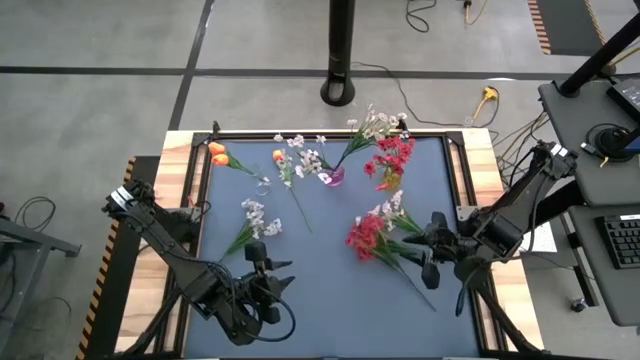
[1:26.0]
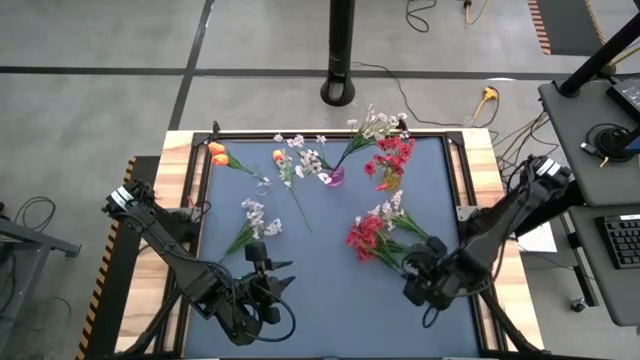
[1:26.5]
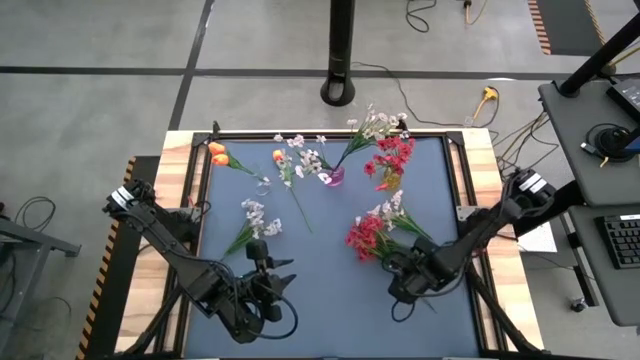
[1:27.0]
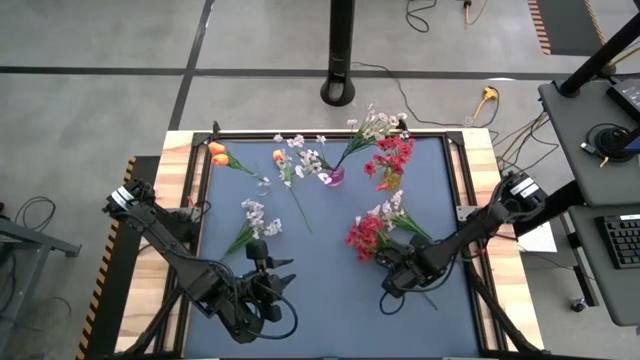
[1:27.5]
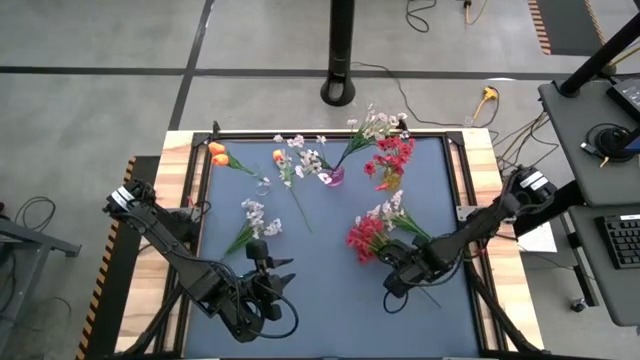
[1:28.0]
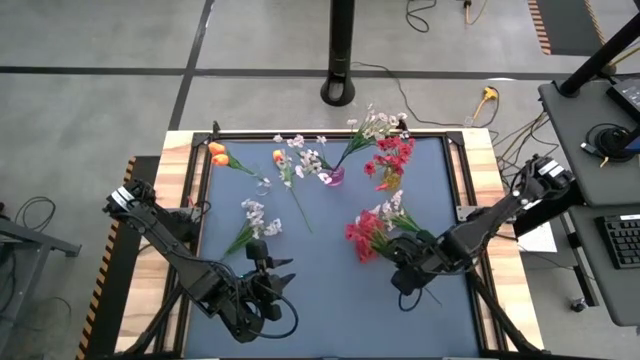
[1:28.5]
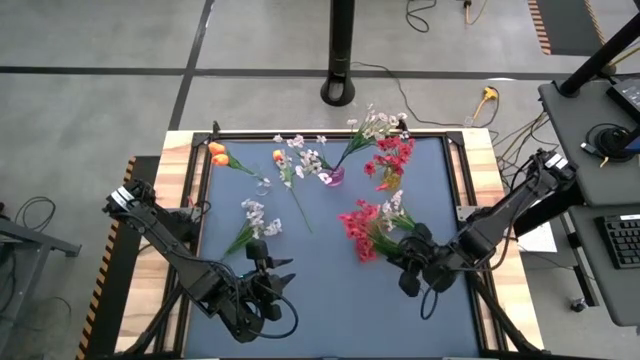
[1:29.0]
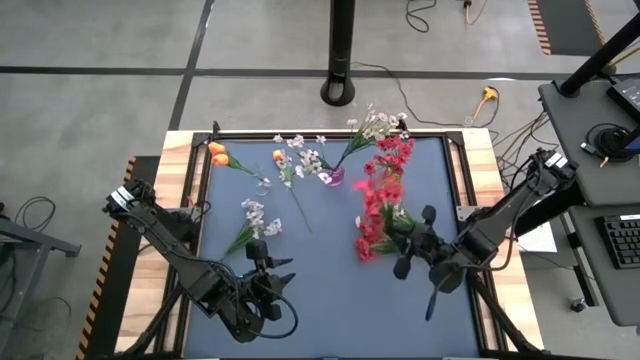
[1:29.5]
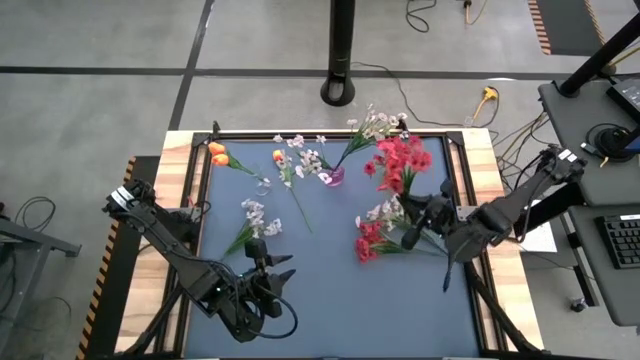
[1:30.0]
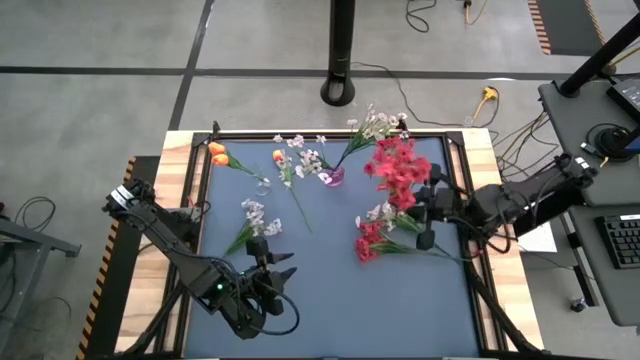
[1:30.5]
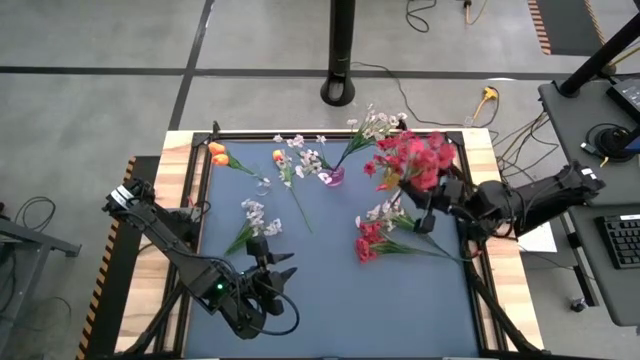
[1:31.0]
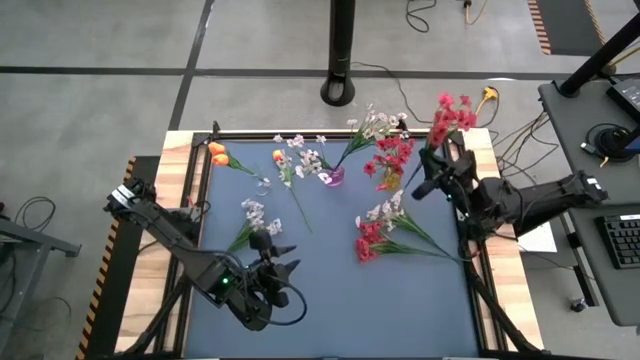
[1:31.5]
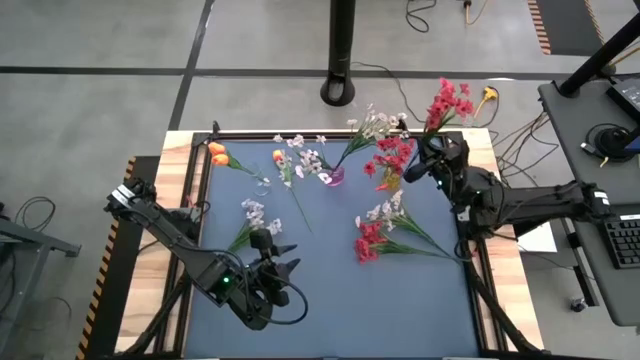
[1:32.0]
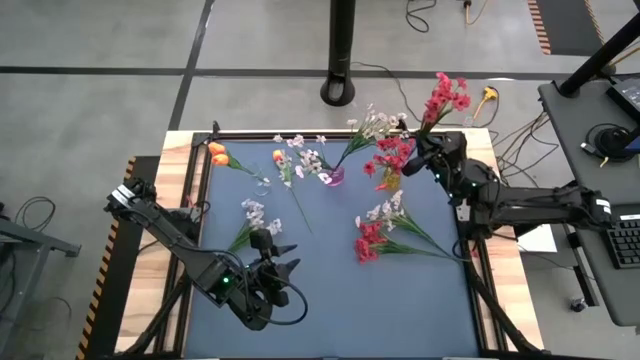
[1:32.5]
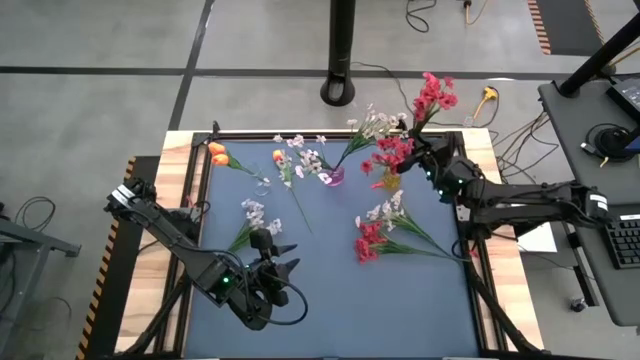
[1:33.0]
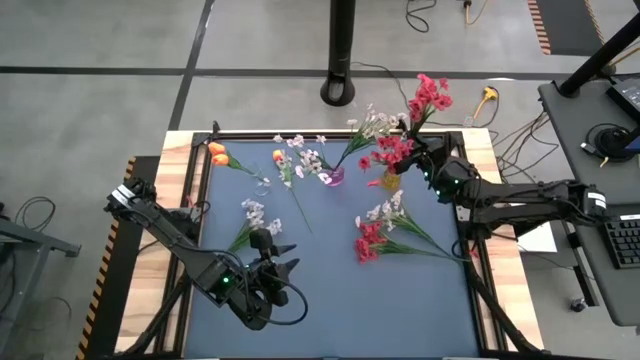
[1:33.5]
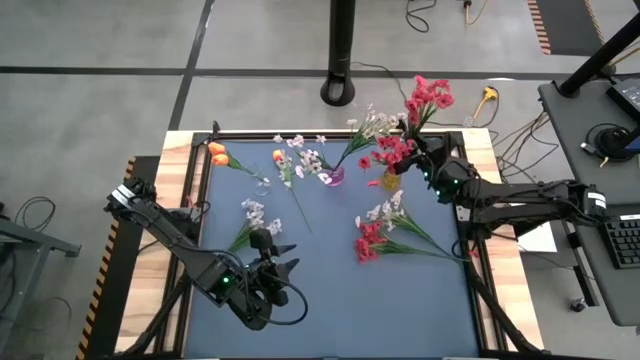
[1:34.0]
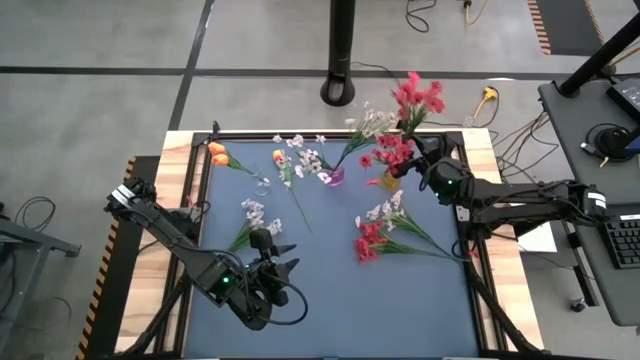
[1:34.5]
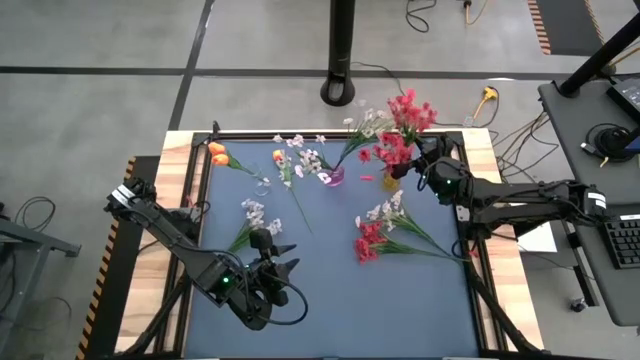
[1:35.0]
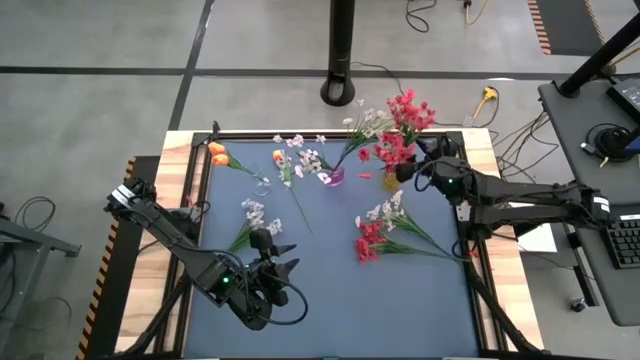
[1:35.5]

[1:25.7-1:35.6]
Task: Sort flowers into vase by color
Put the red flowers into the yellow vase

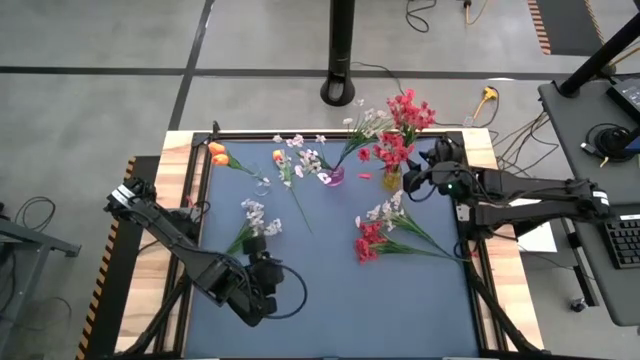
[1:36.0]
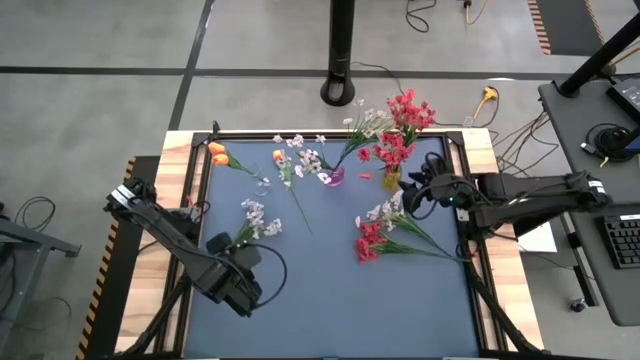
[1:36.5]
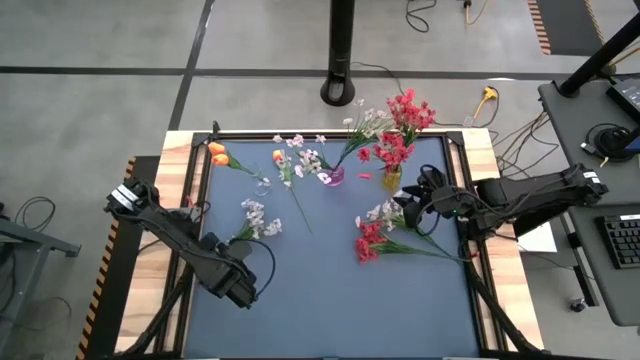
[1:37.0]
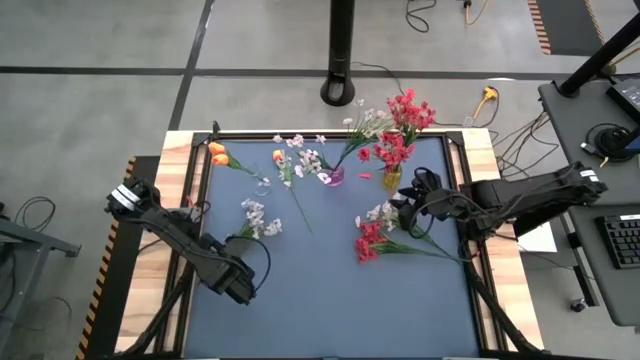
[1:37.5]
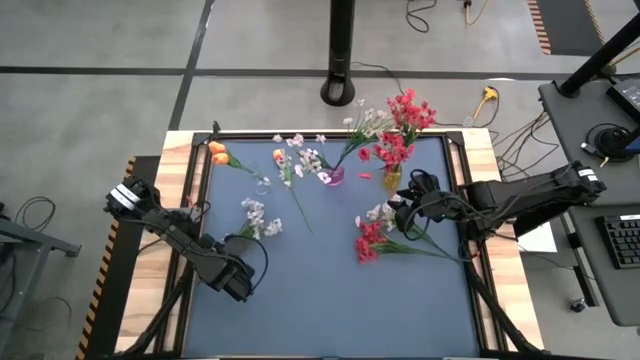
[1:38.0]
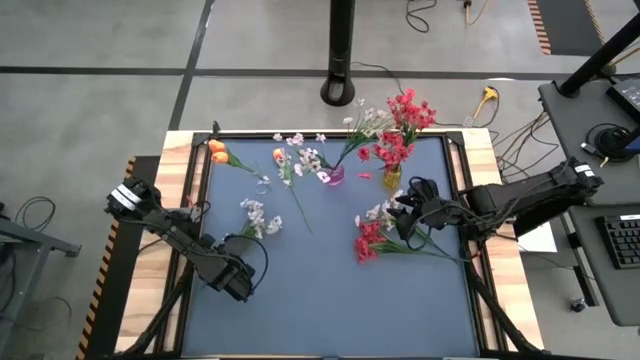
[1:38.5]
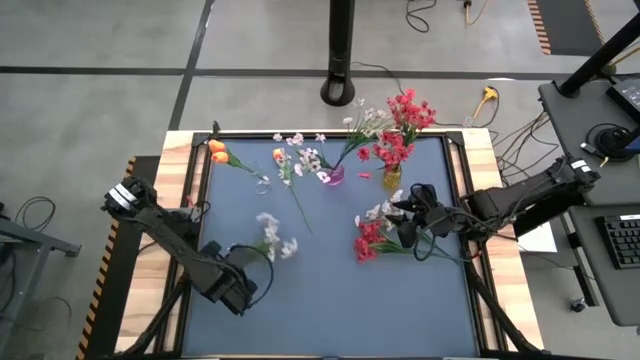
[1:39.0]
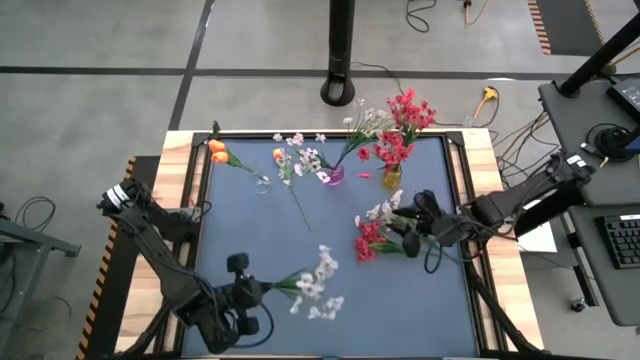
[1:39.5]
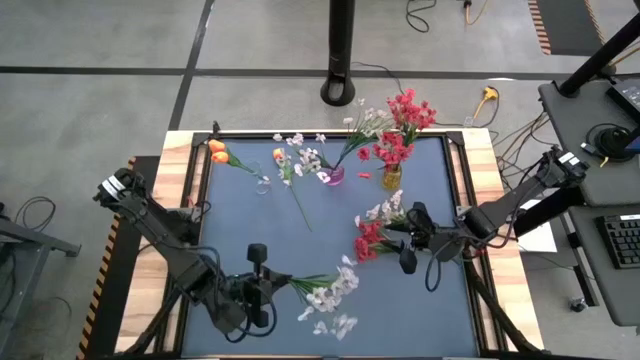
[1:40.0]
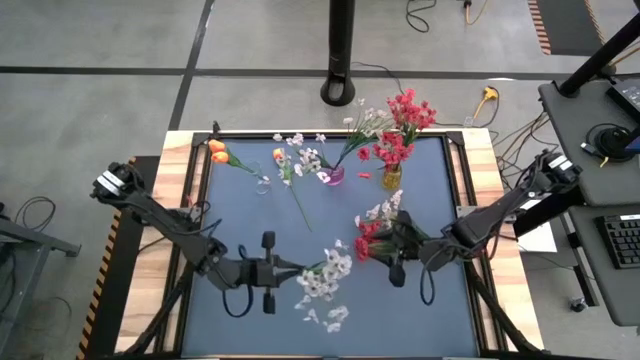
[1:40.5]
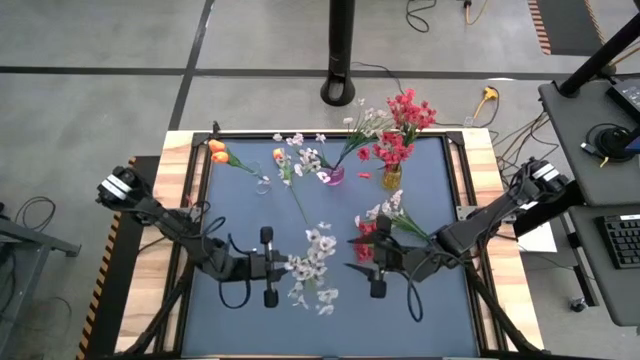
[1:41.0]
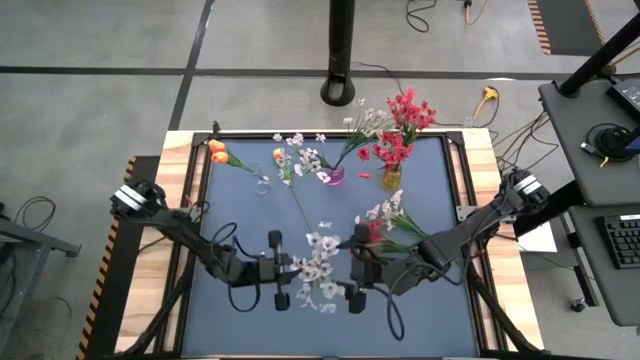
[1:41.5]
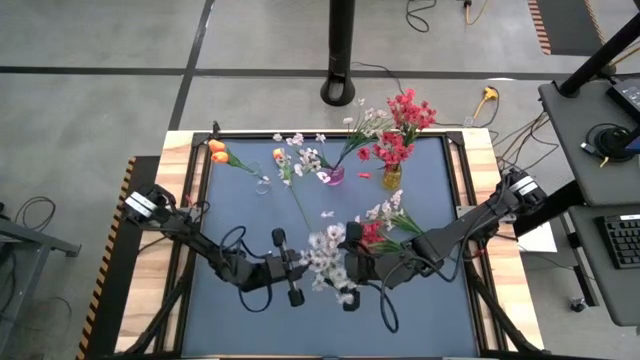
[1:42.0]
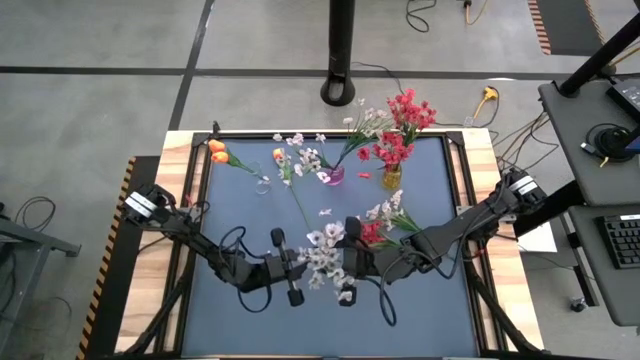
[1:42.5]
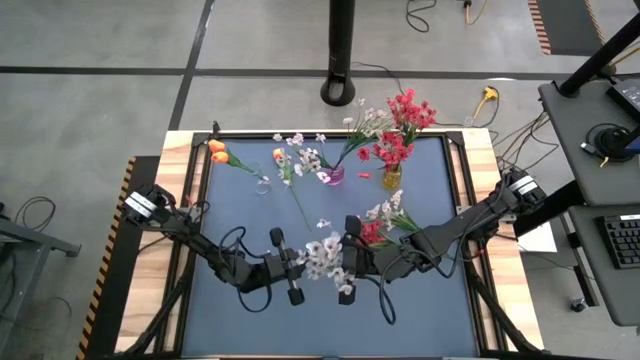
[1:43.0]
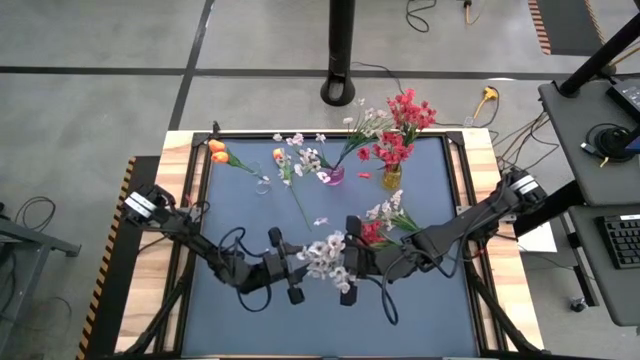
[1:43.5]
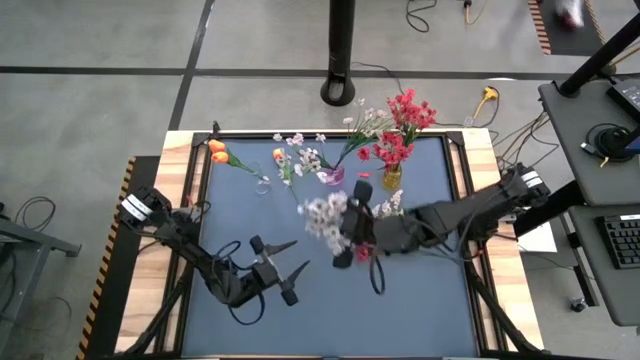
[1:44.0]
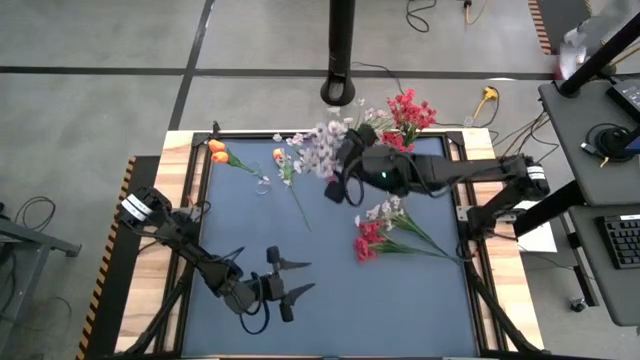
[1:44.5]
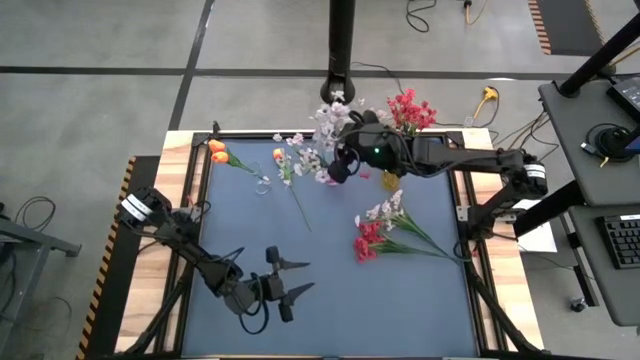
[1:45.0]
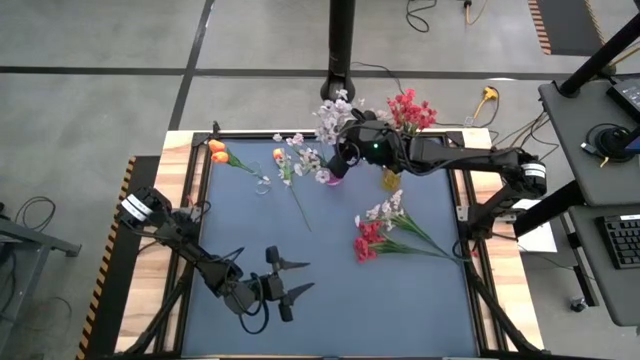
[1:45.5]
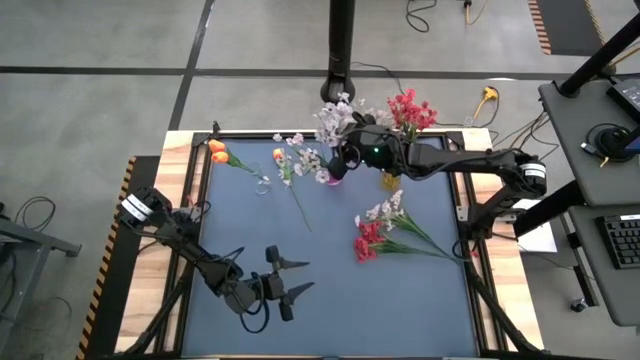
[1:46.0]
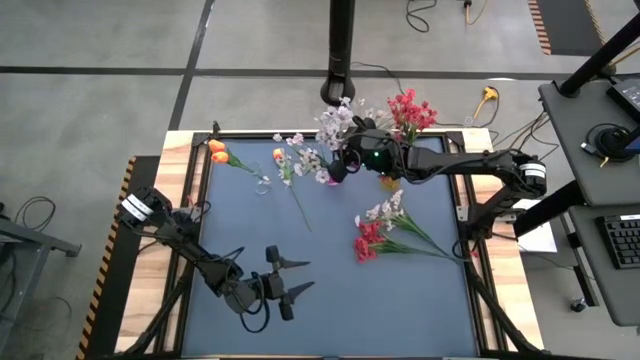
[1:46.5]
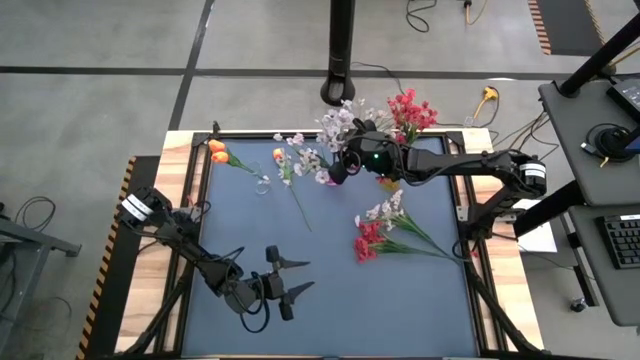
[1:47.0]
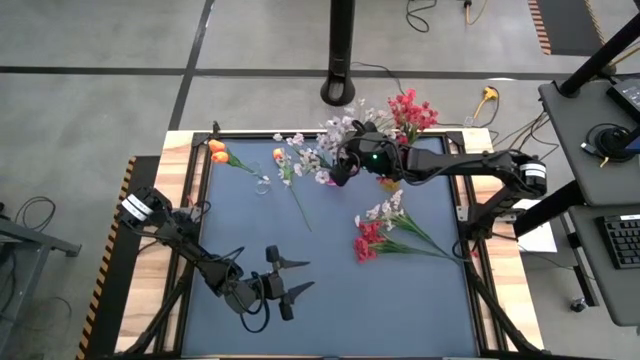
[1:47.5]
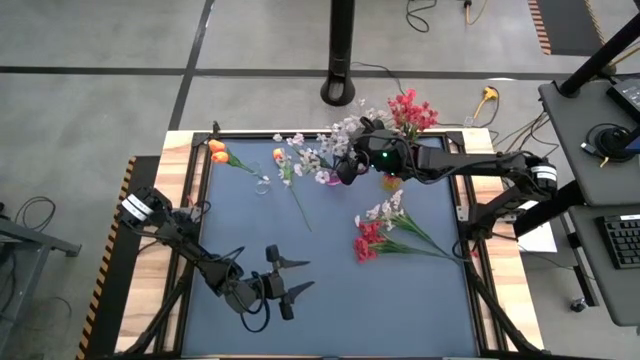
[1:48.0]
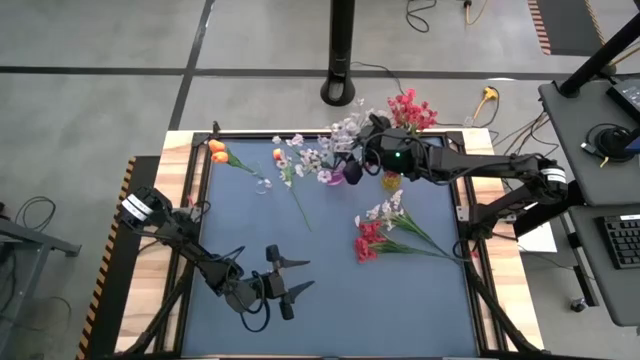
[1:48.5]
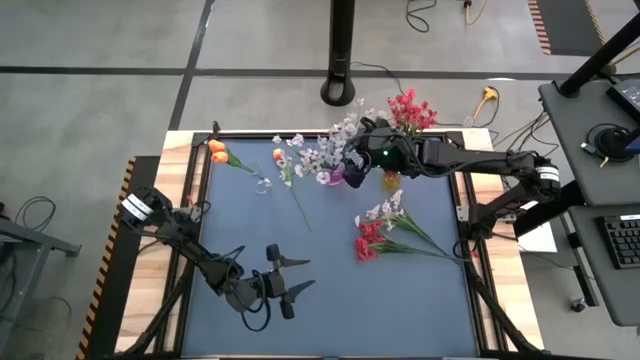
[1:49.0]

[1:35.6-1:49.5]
Put the white flowers into the pink vase
